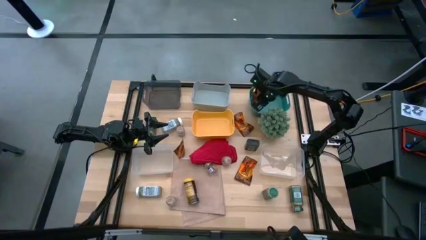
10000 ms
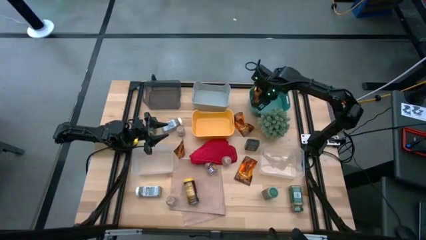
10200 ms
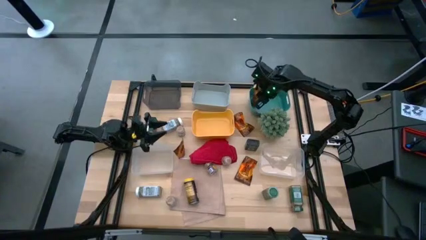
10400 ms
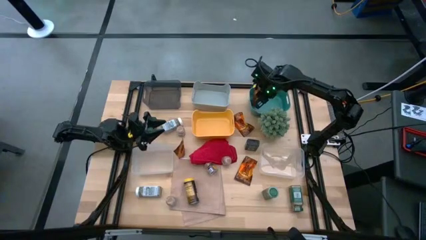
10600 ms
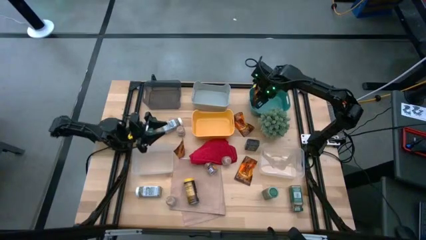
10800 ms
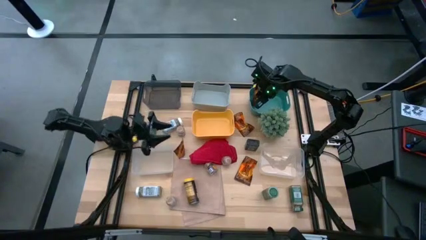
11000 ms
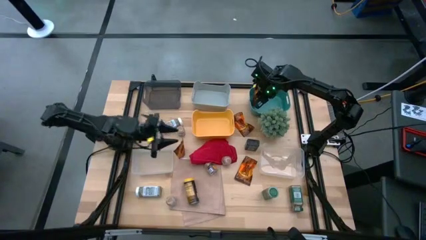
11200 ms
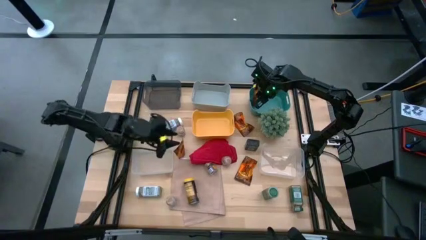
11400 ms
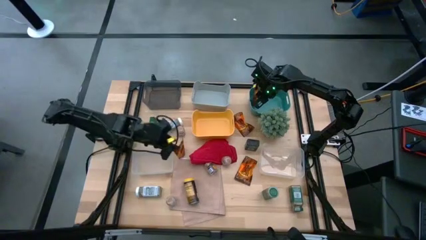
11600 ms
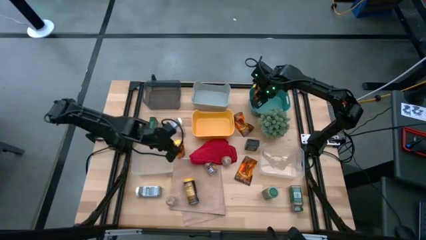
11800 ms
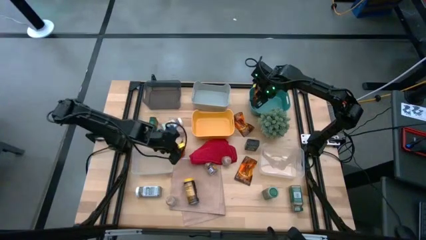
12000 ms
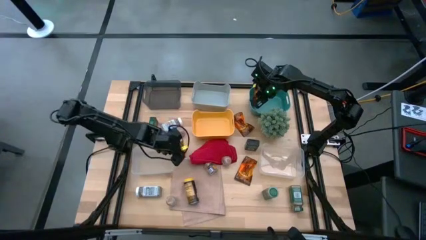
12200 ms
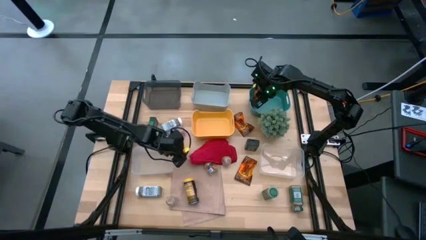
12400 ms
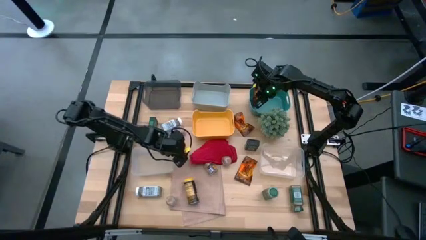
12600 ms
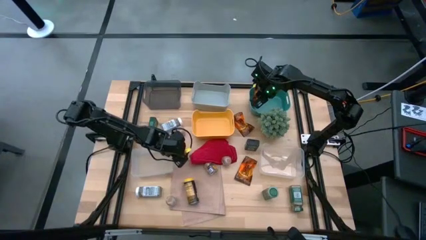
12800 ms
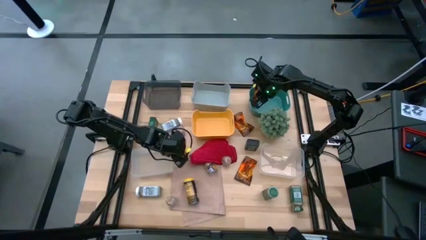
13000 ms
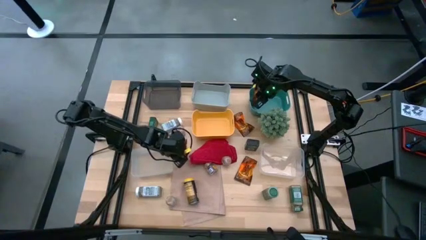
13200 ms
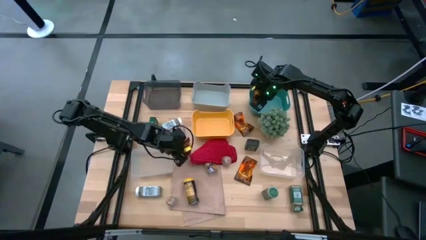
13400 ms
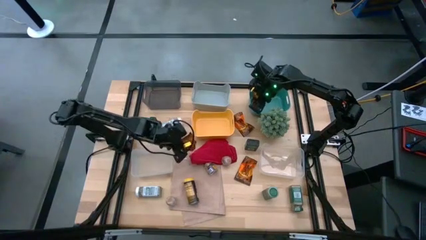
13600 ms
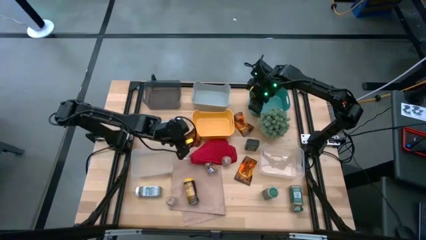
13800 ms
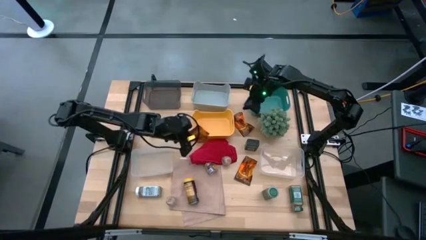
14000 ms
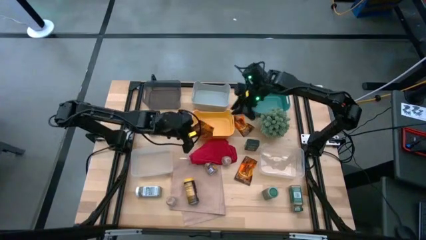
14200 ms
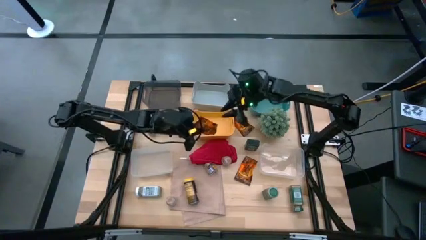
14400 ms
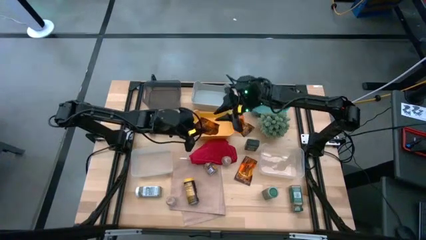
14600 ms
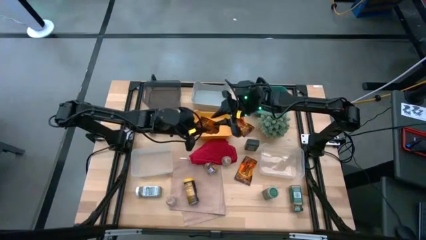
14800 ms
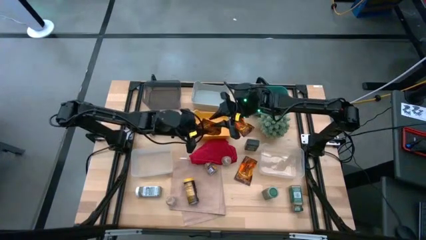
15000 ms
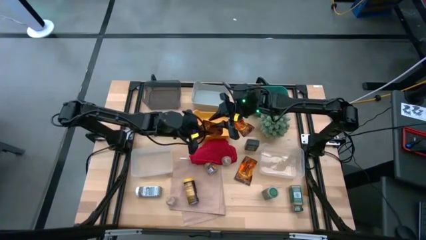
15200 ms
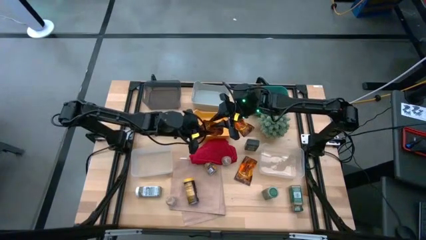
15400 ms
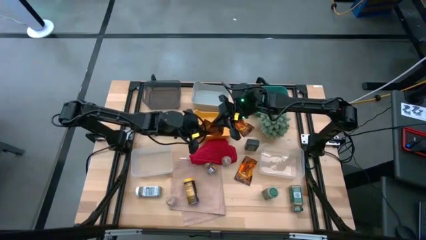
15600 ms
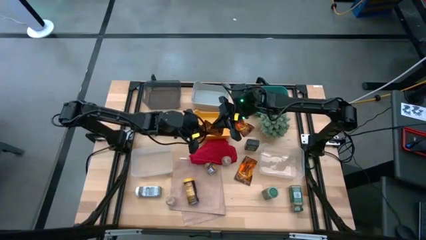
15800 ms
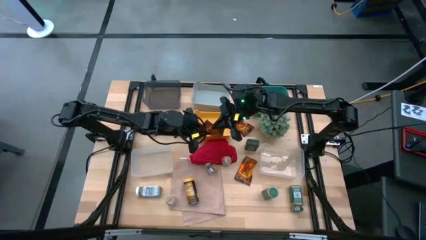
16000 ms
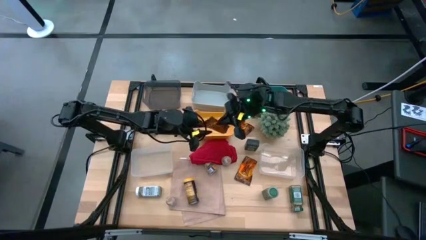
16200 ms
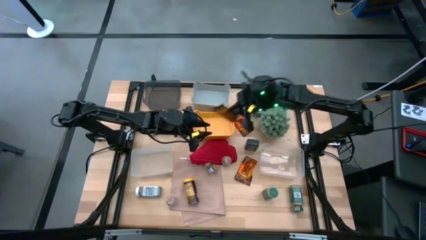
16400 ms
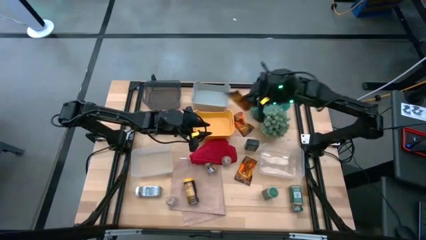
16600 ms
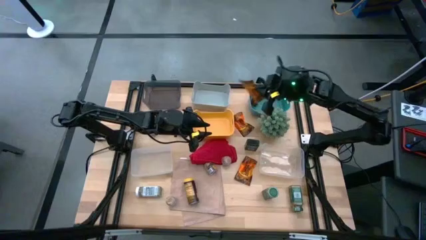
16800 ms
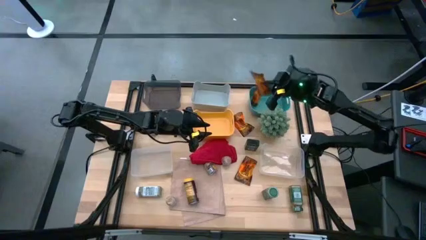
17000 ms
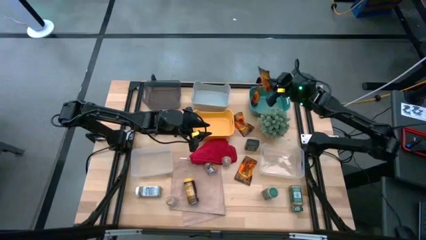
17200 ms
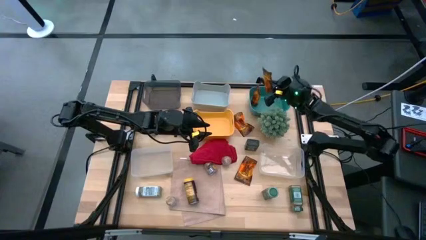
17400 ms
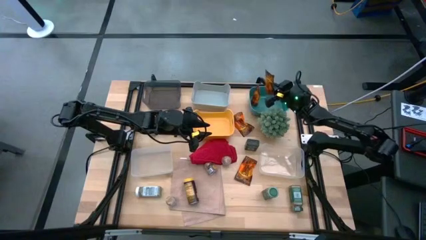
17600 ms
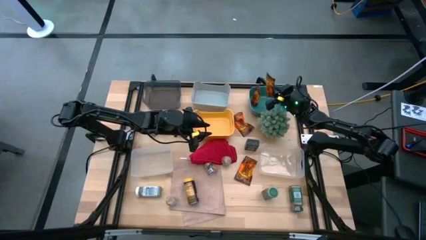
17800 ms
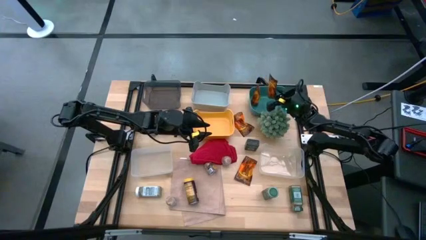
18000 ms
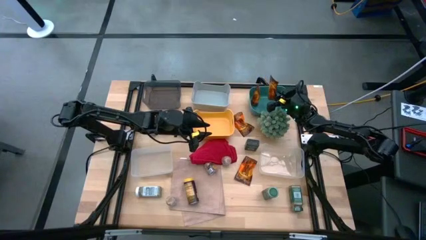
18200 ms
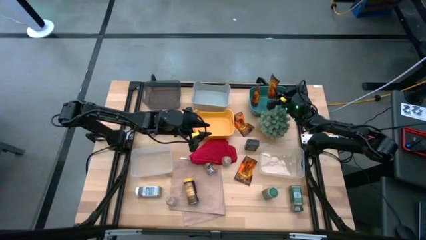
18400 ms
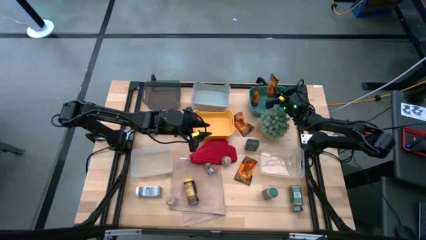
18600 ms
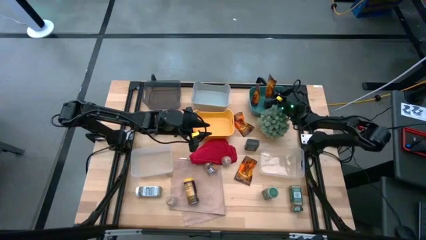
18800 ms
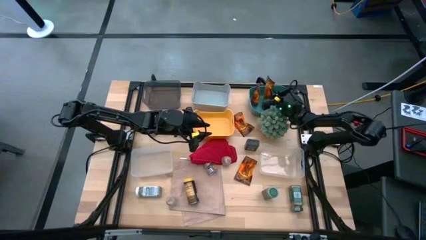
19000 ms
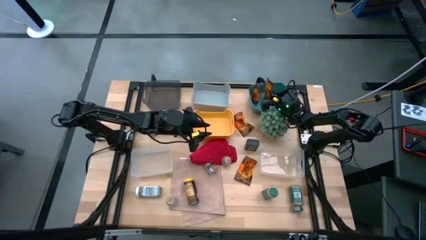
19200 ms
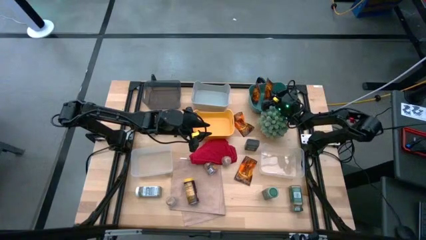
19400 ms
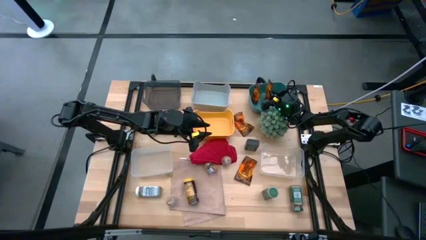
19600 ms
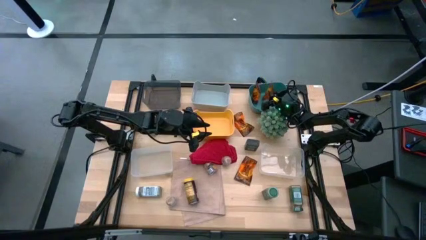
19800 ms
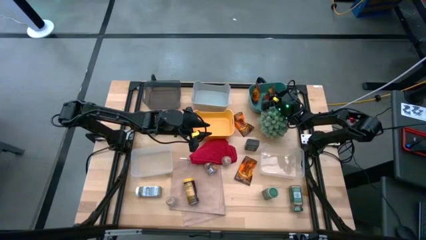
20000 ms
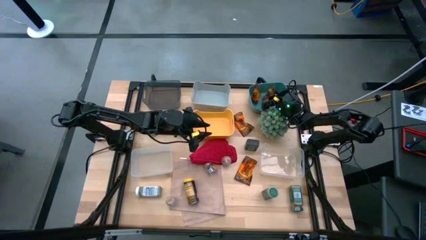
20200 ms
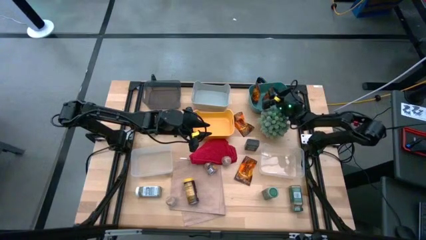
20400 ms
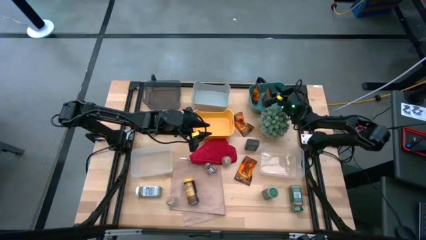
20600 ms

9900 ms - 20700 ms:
Task: Sort spices by type
Put the brown seasoning pack into the green bin
